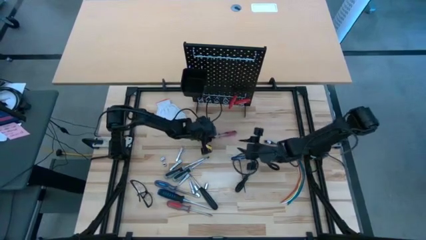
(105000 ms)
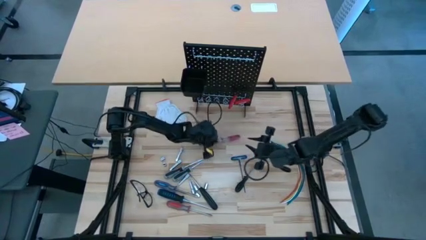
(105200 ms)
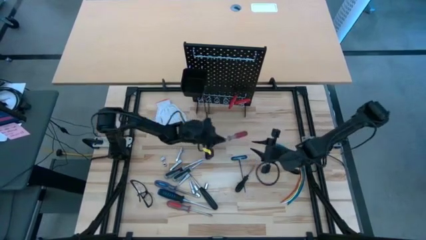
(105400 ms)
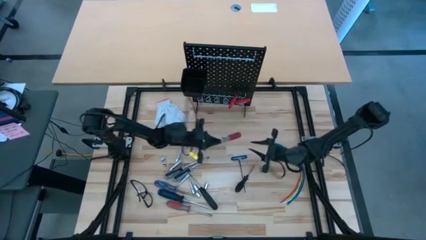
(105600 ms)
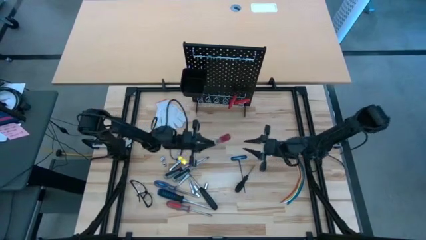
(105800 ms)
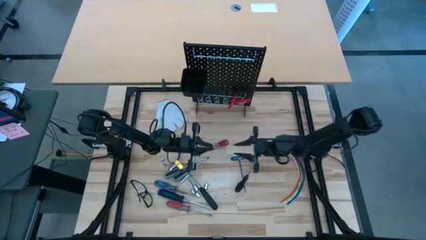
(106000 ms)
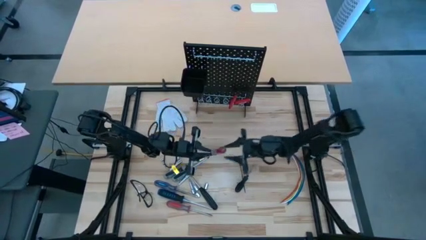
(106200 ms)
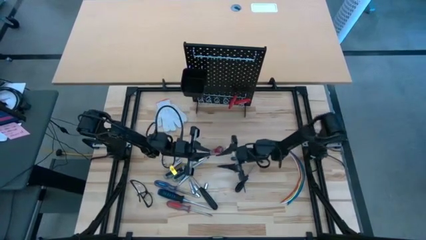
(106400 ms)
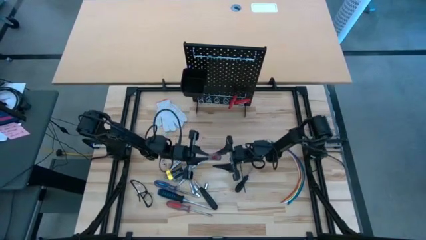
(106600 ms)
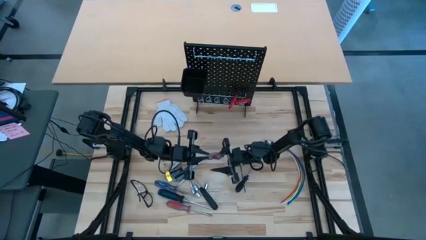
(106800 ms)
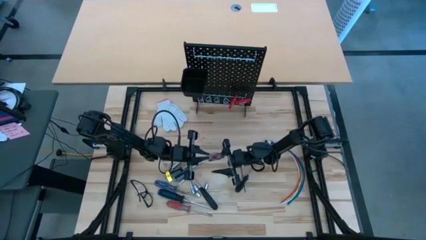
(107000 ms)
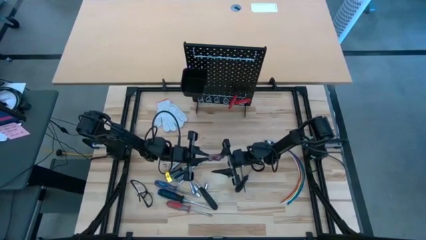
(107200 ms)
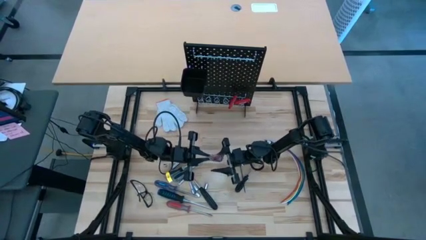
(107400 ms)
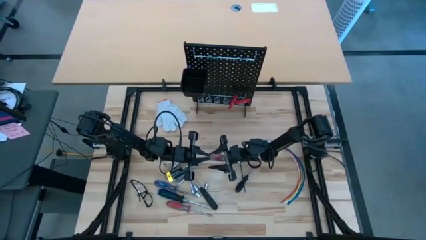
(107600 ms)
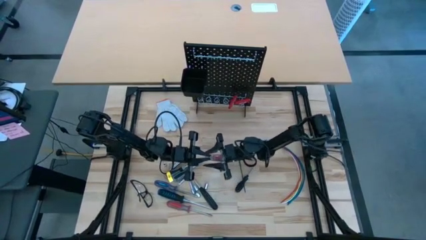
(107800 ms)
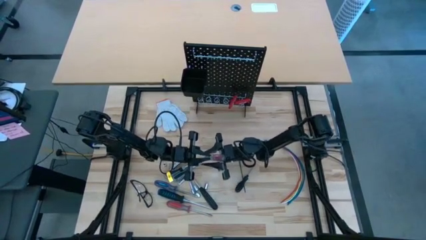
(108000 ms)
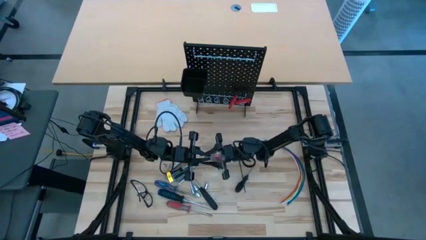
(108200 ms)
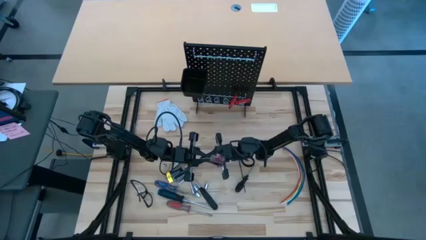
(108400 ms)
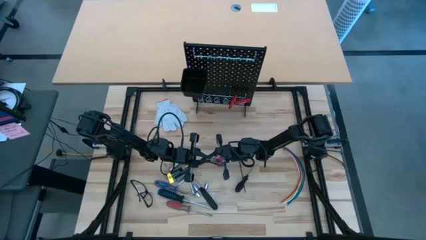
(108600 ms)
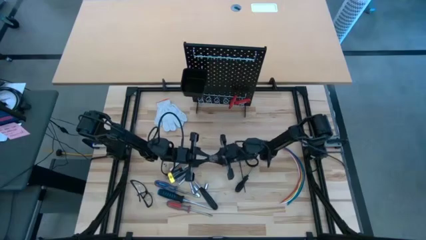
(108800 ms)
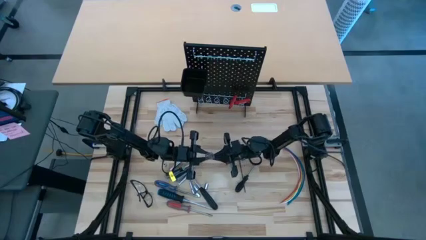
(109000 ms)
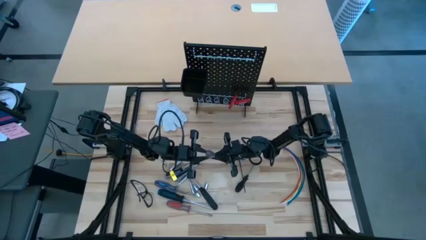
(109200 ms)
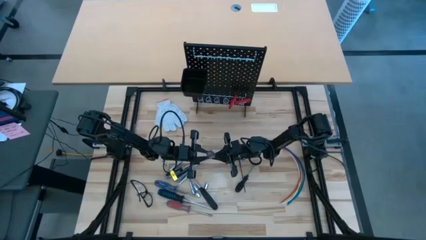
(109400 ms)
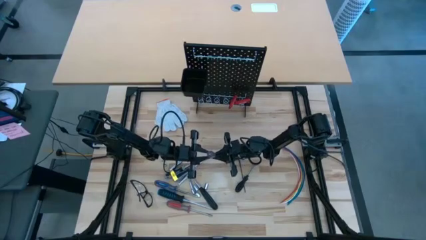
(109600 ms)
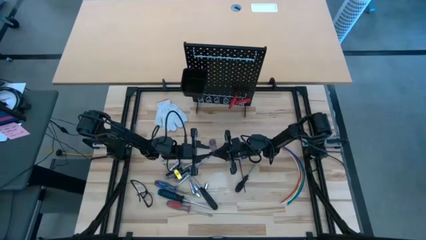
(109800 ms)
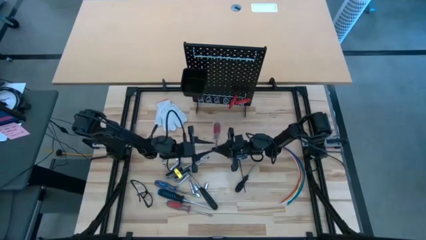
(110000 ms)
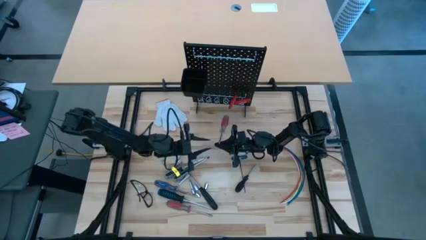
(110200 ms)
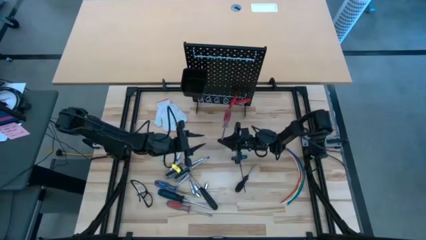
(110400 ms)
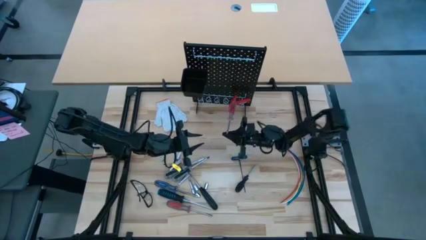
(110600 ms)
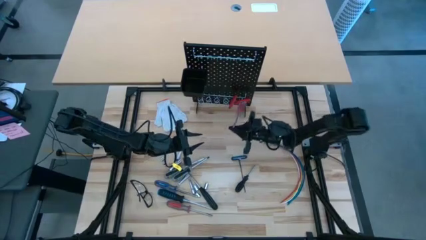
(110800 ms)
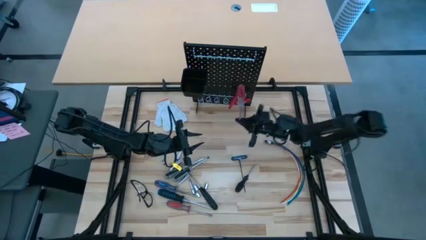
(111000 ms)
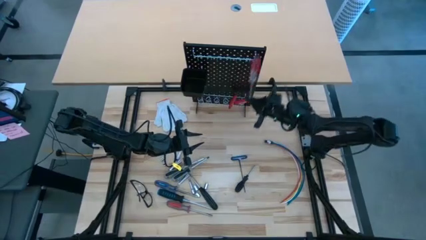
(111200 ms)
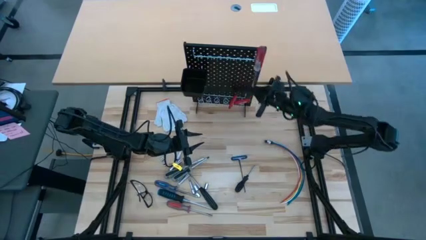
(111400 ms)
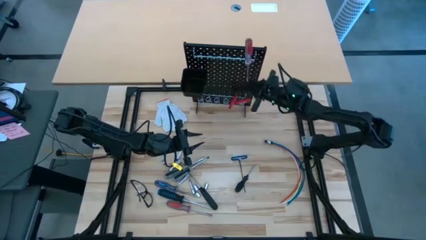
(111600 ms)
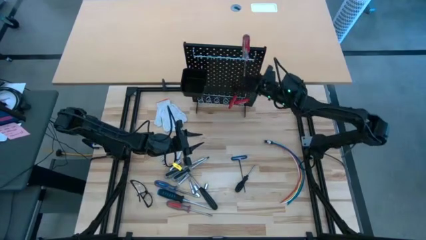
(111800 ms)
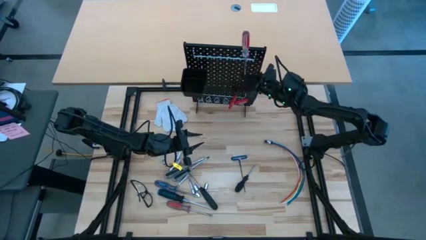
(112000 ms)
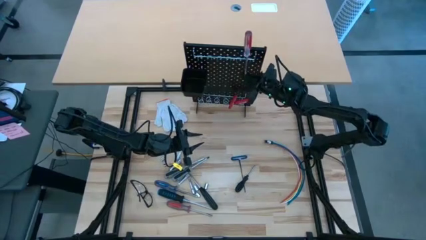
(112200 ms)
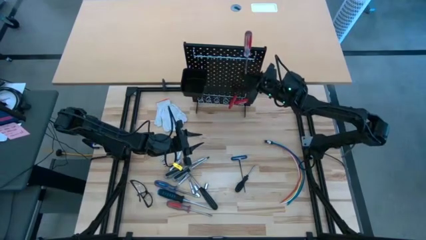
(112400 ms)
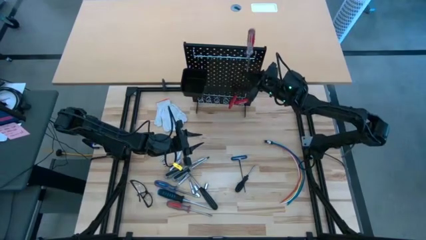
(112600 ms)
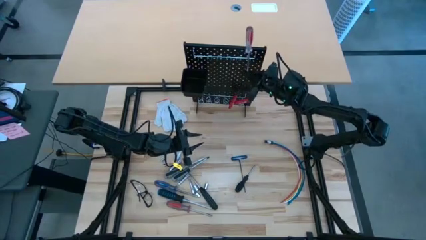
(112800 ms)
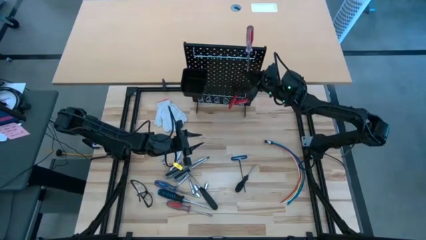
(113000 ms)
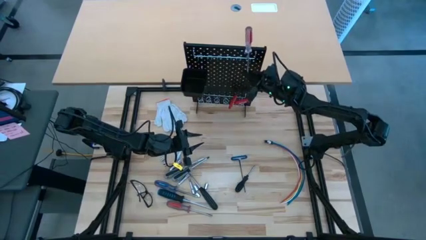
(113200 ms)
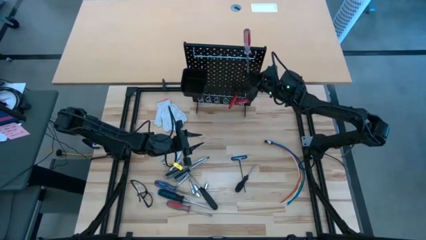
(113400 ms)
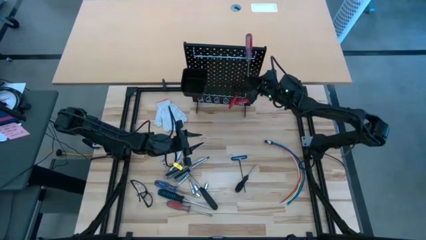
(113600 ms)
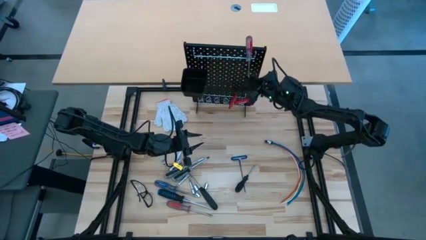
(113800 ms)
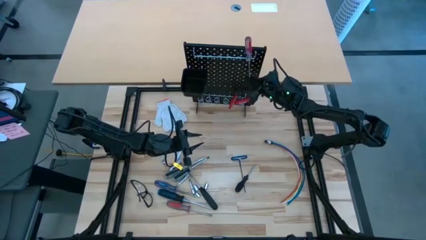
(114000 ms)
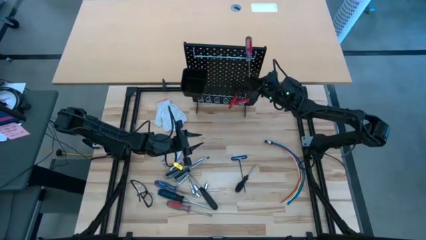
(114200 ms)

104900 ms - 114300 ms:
Task: Hang tools onto peg board
Hang the red transparent screwdriver on the pegboard

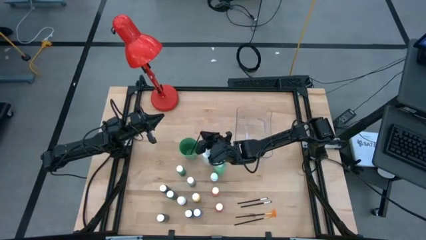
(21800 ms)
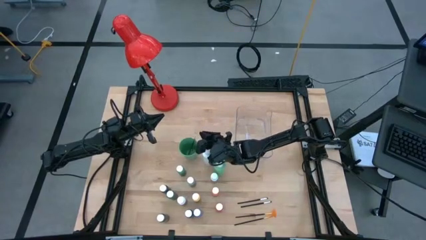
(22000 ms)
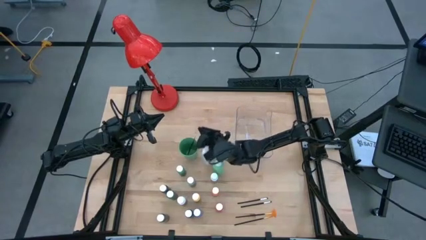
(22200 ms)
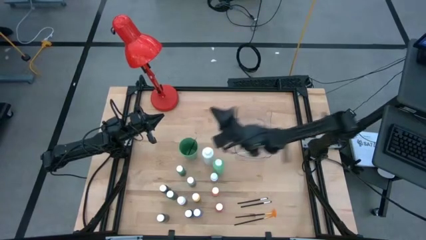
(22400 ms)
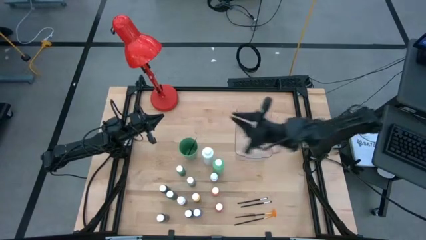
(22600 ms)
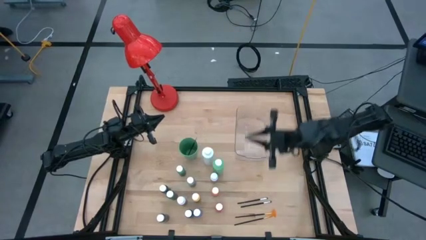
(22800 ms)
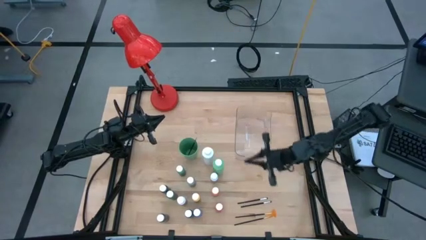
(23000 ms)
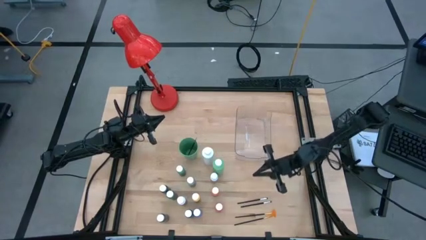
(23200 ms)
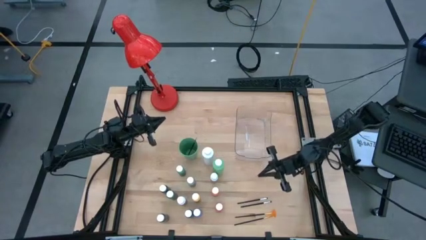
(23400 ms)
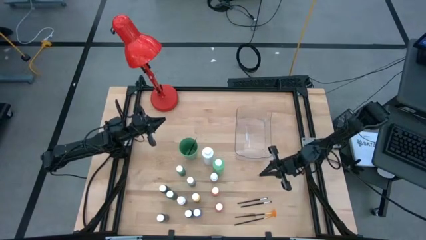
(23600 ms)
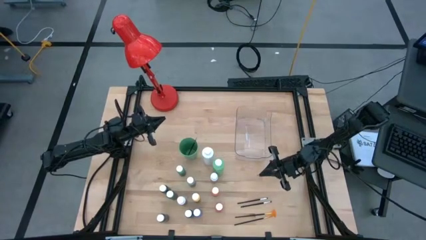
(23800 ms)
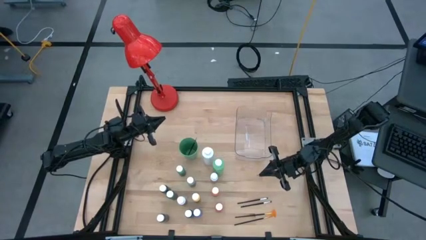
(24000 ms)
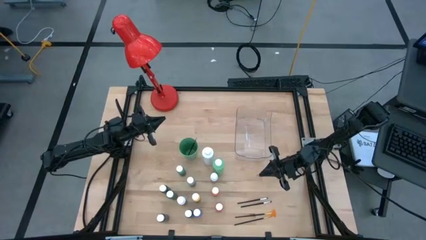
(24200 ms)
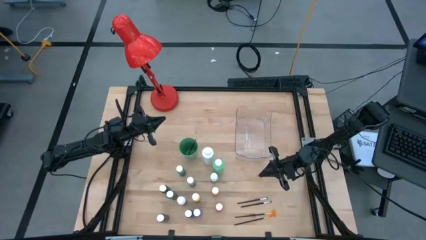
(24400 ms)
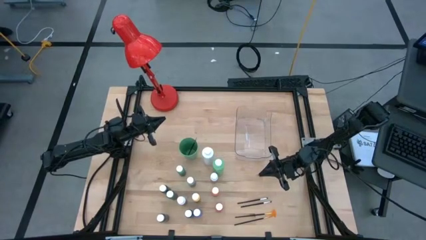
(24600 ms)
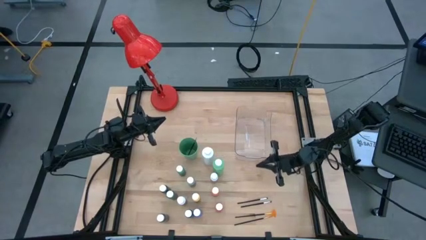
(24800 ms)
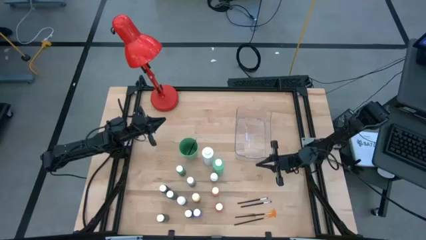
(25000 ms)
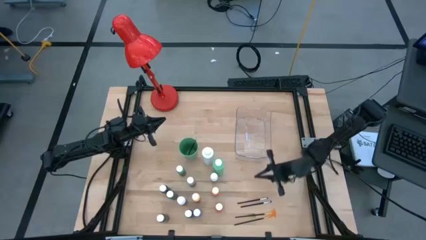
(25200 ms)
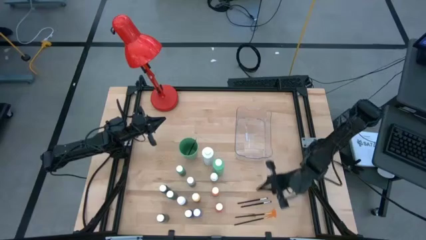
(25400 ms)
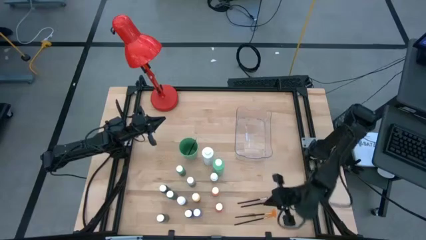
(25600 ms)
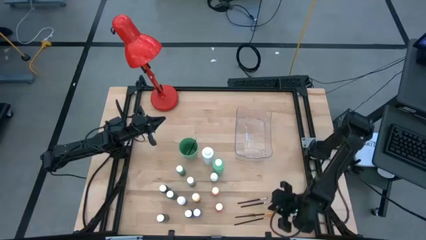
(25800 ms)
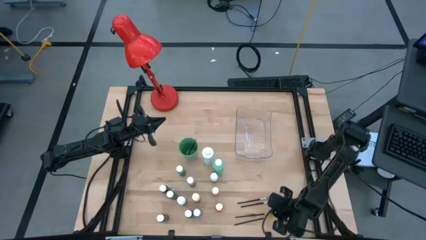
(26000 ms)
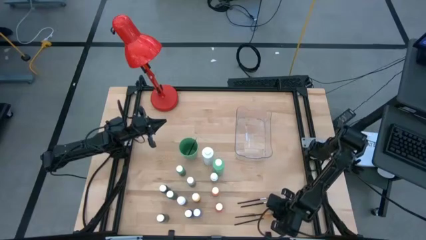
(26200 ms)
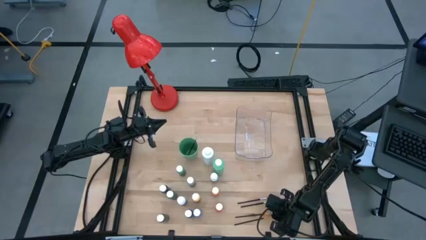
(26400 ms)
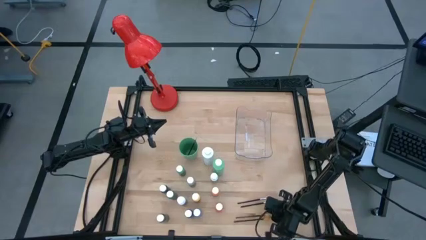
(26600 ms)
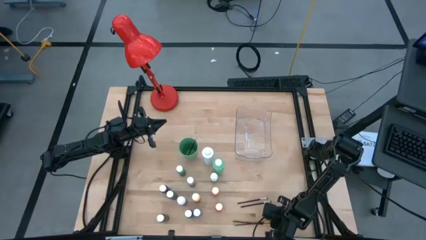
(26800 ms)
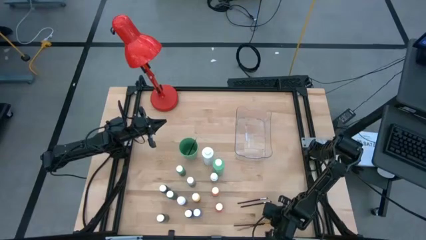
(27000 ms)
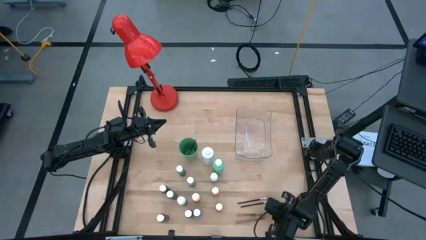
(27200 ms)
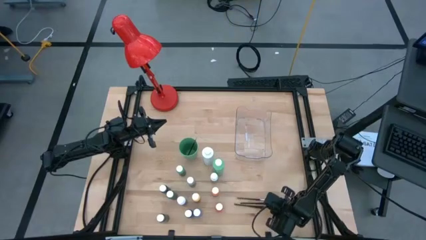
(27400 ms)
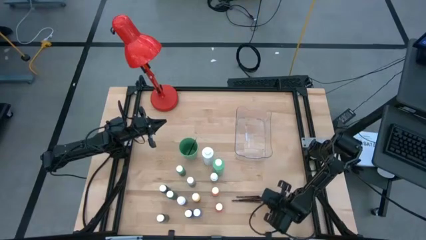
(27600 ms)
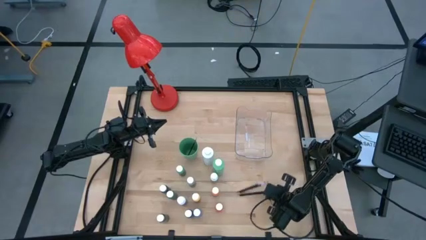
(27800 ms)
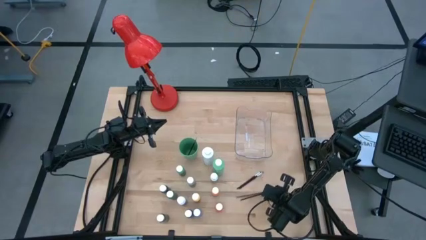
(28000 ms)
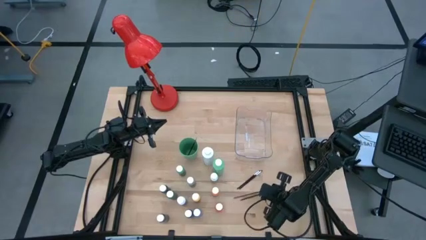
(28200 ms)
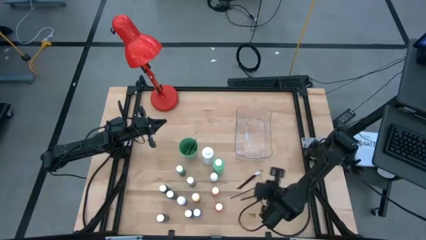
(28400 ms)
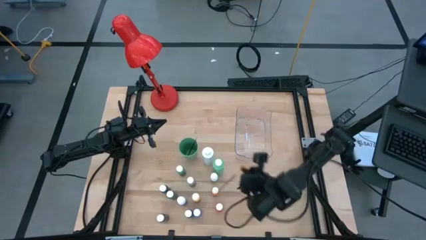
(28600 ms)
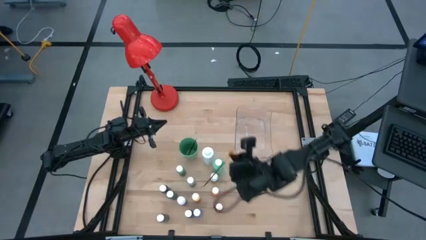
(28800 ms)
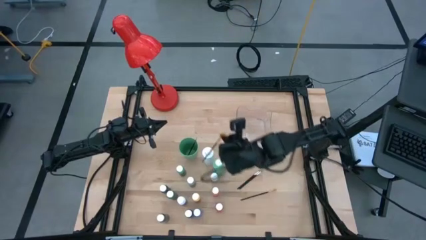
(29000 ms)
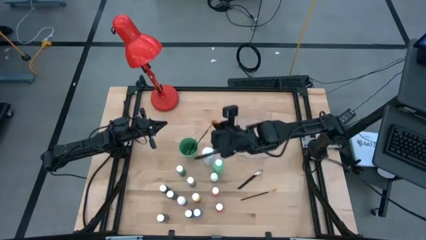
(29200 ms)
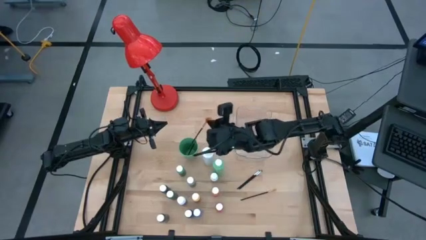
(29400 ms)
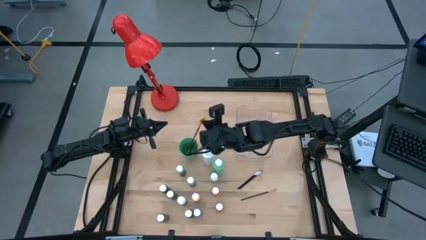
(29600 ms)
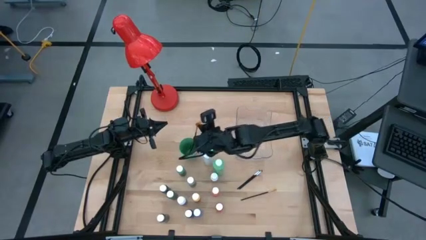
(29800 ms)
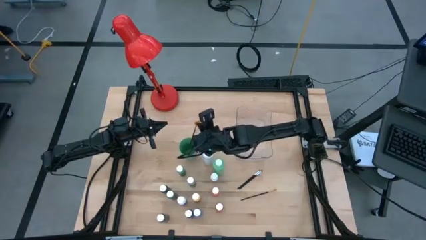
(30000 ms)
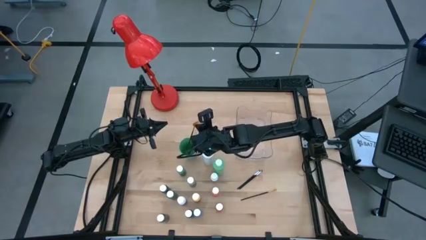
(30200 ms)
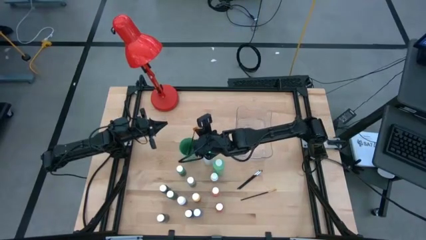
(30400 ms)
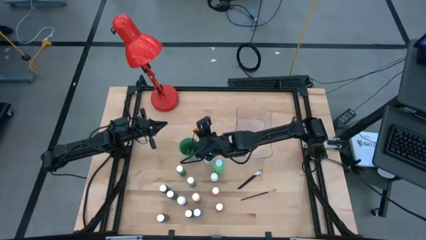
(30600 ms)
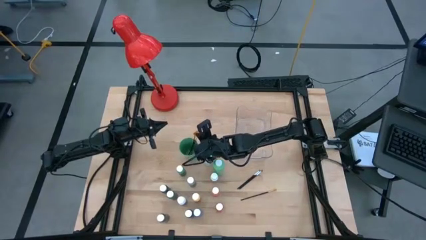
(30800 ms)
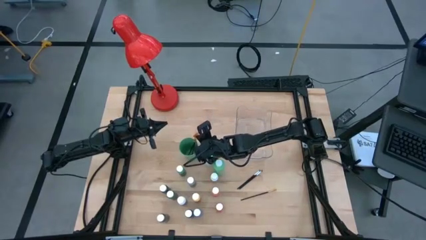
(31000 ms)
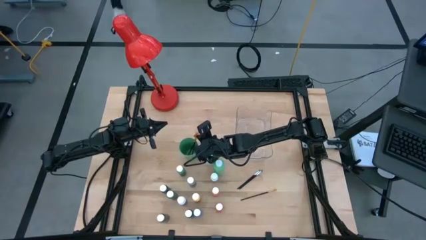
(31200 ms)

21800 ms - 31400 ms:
Task: Pick & Place Paint Supplies
Put the top gold paintbrush into the green cup
